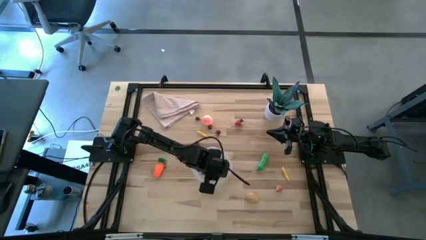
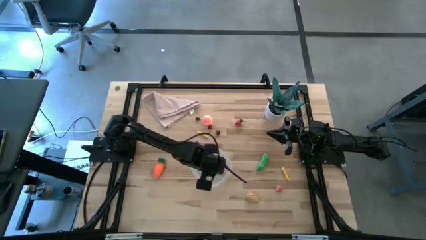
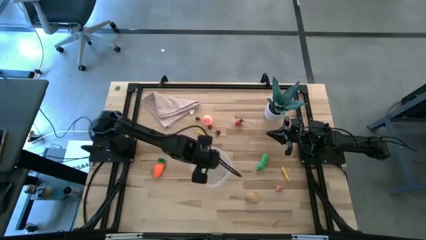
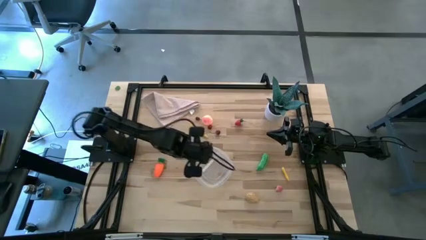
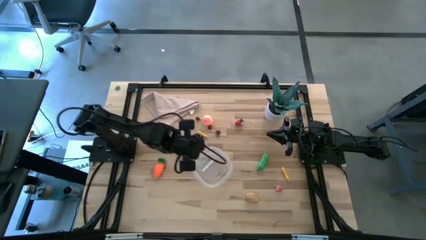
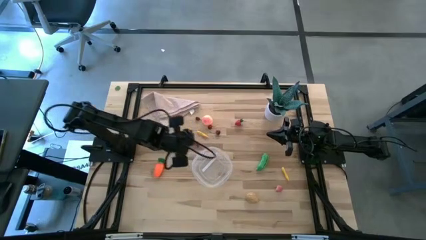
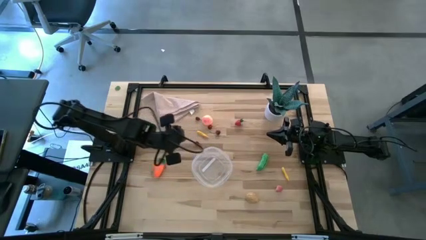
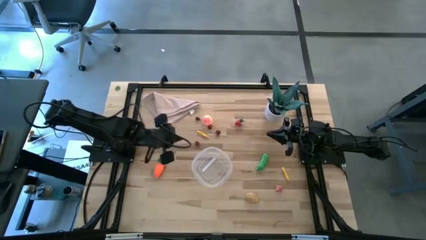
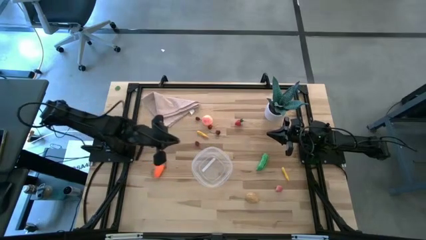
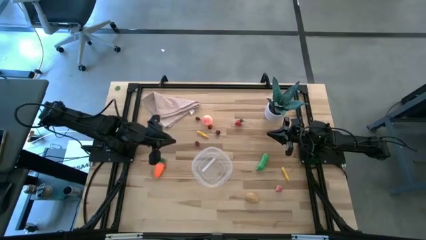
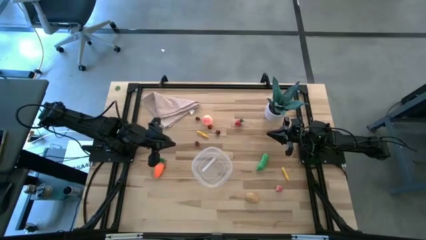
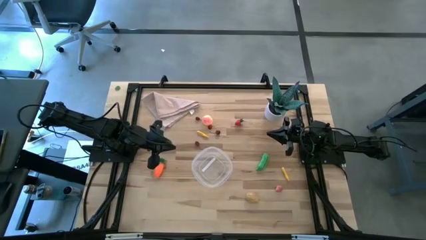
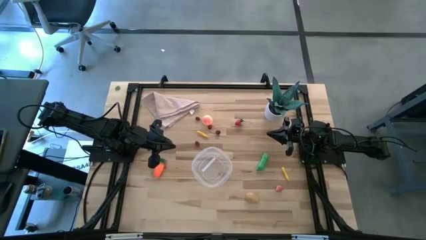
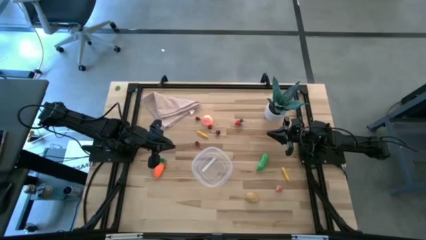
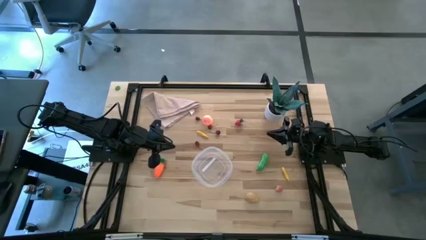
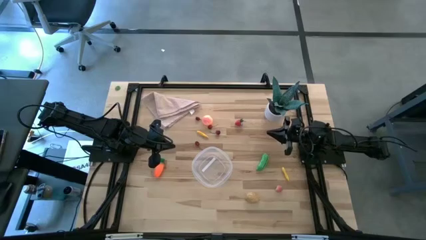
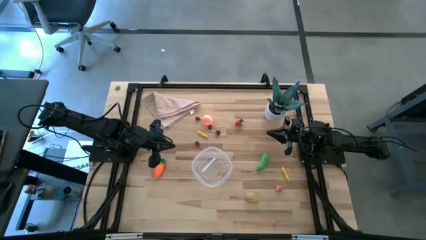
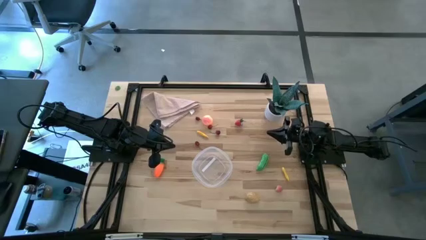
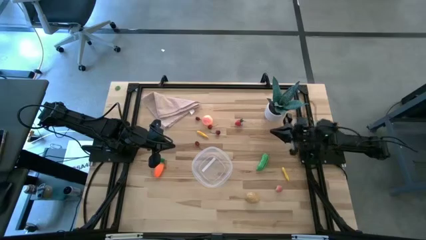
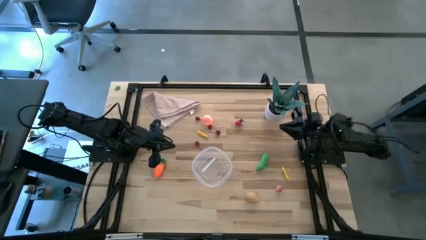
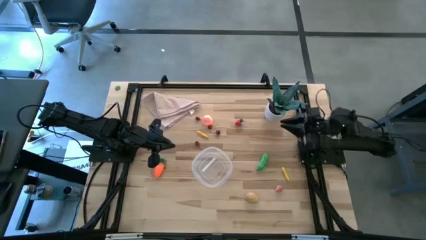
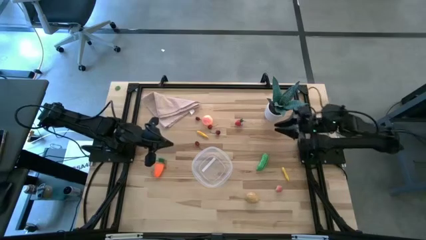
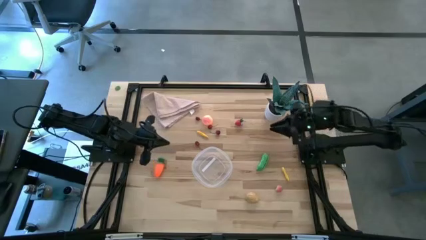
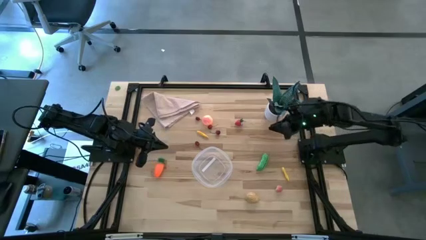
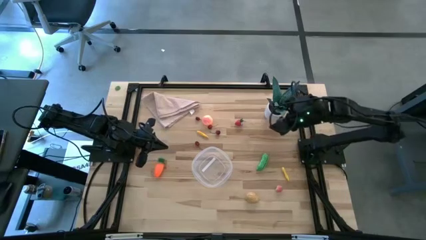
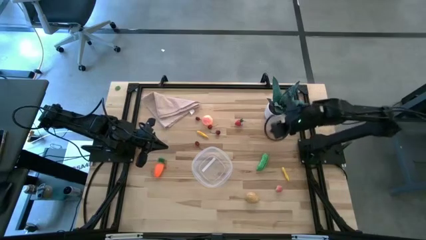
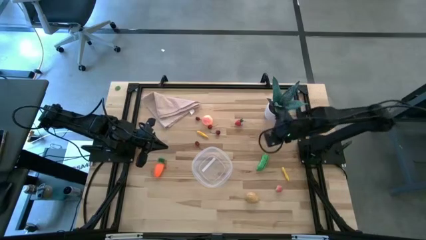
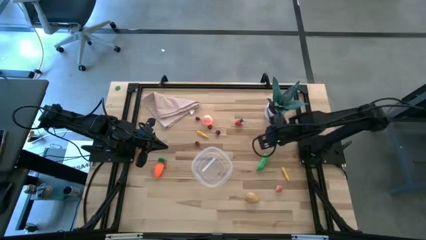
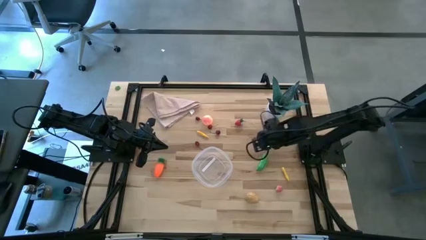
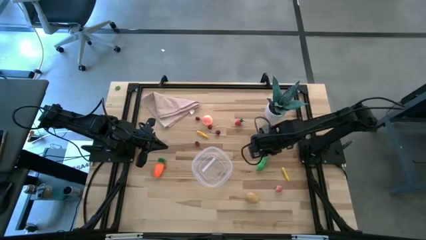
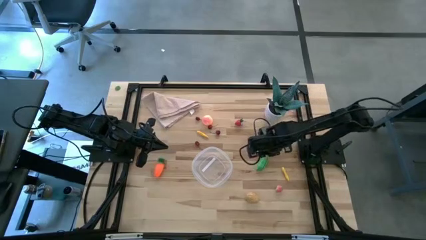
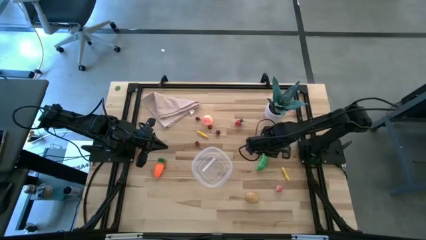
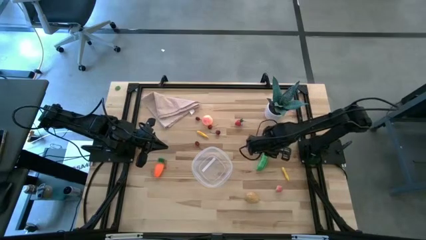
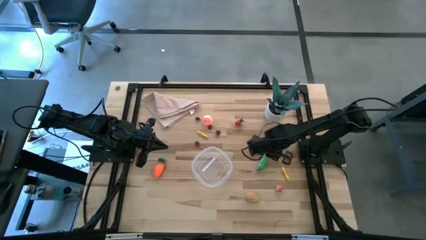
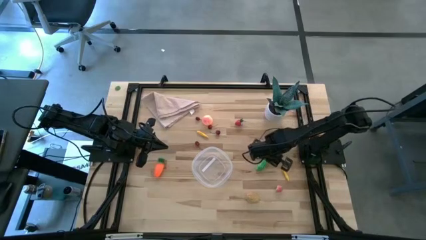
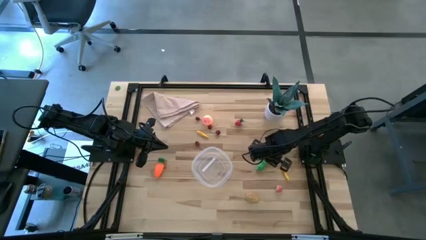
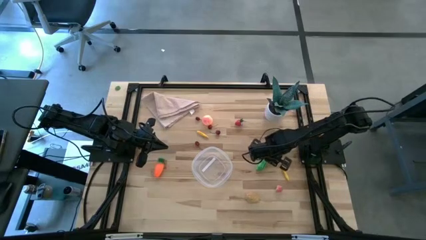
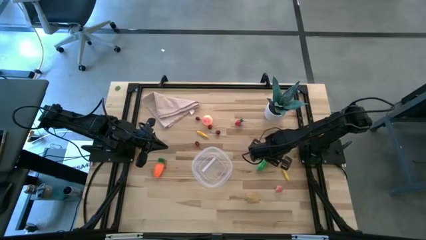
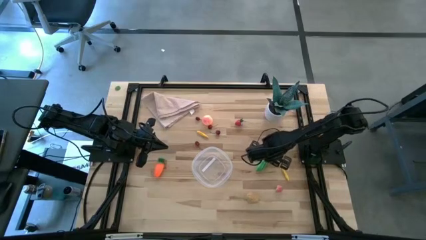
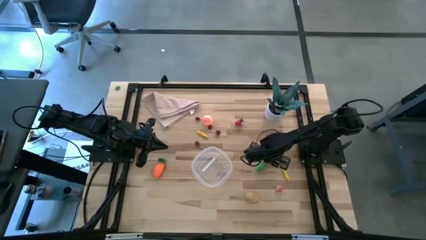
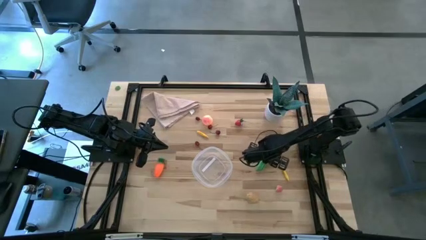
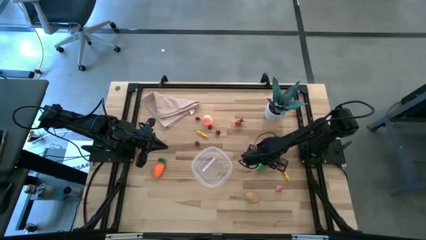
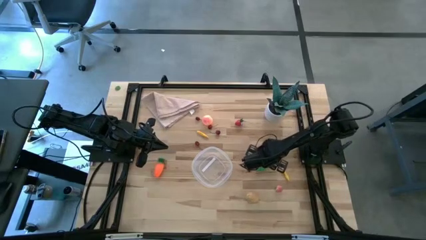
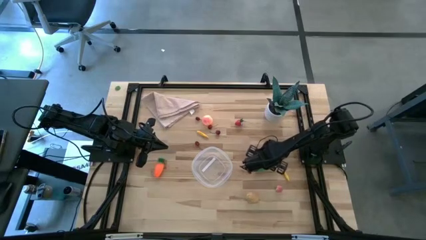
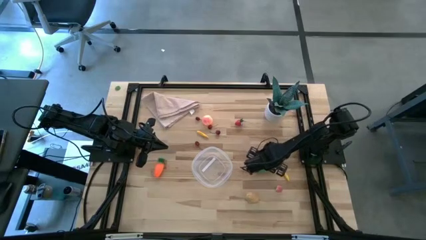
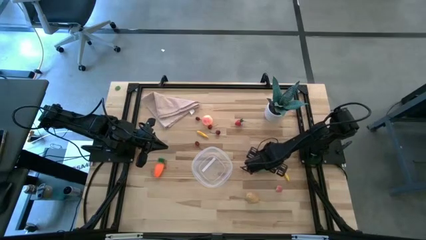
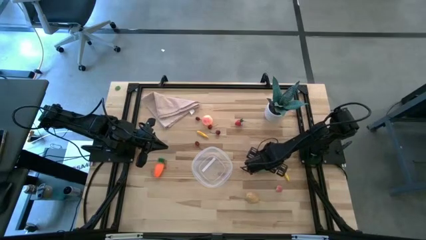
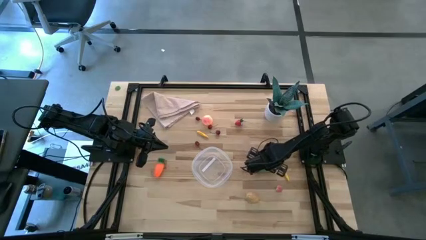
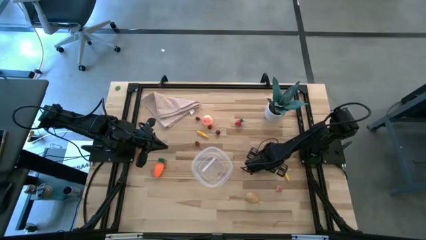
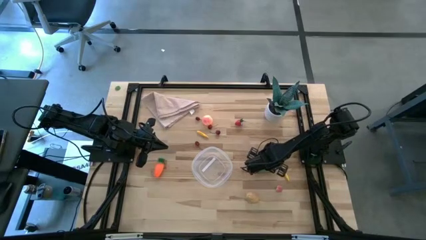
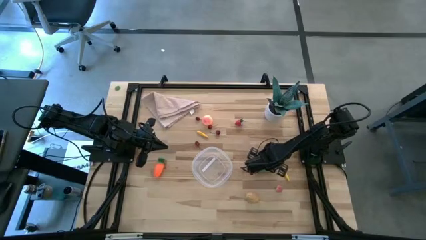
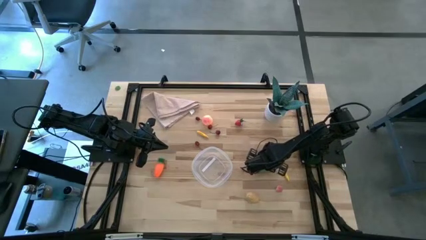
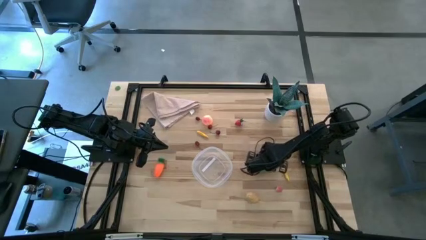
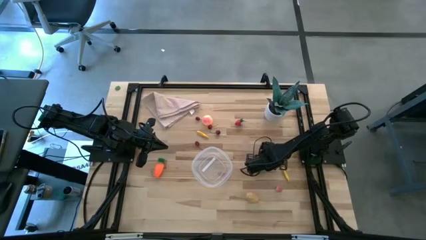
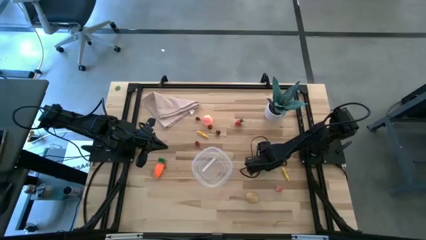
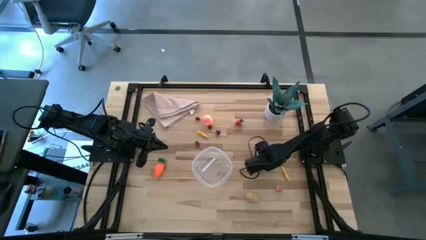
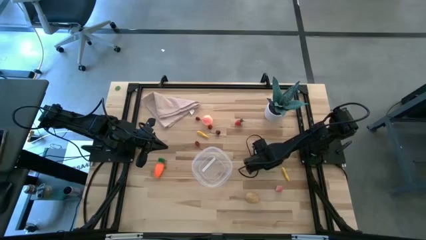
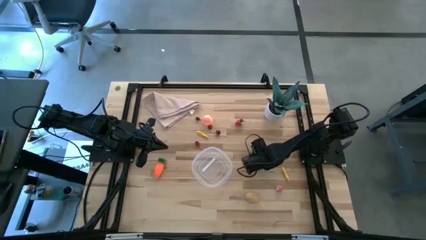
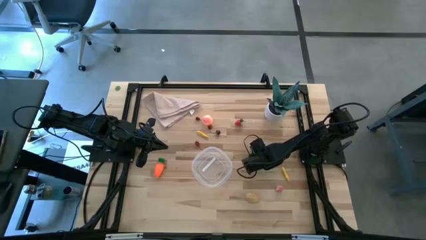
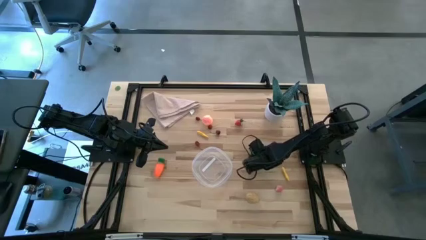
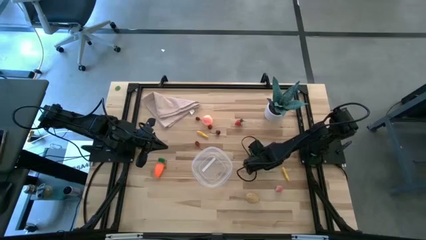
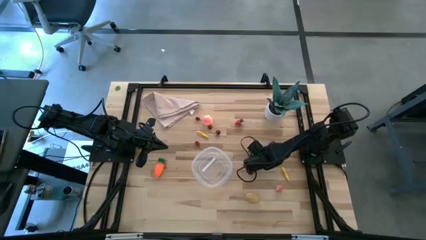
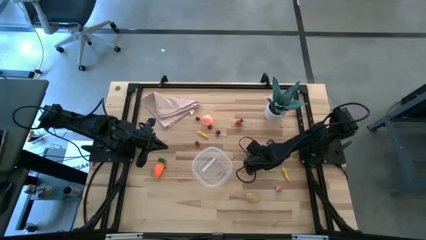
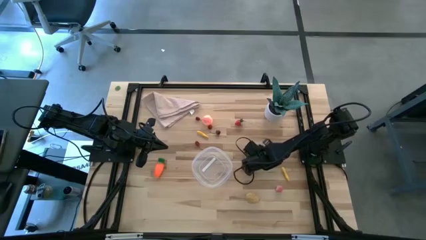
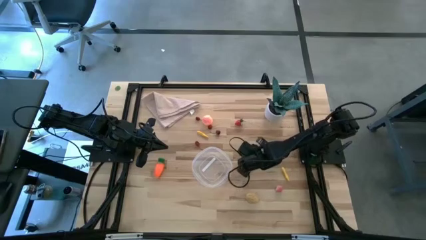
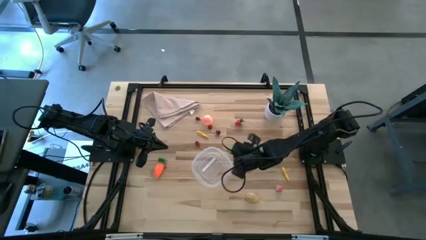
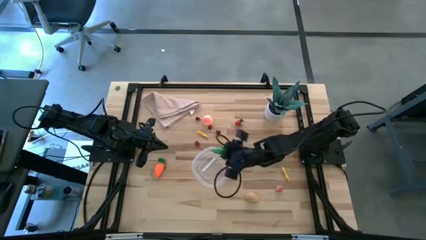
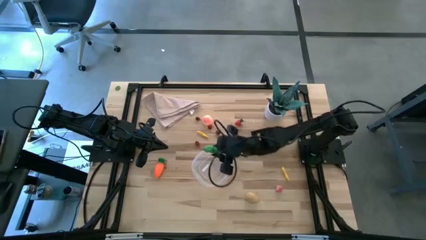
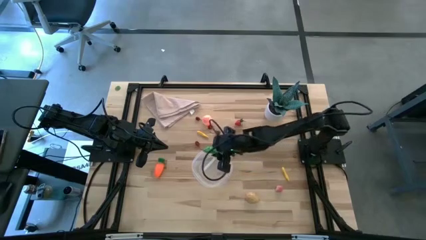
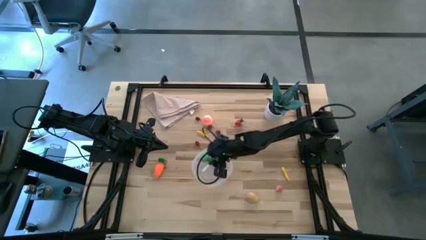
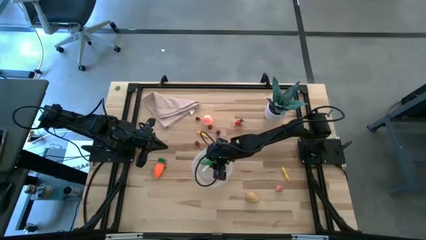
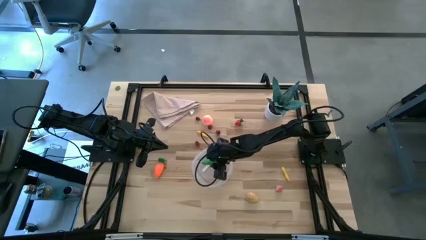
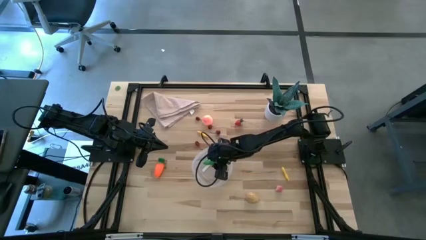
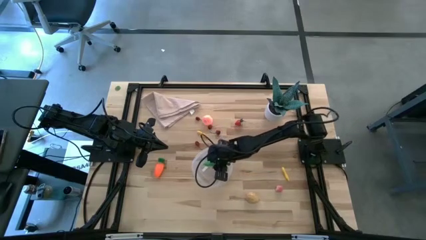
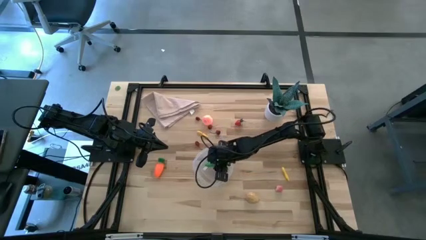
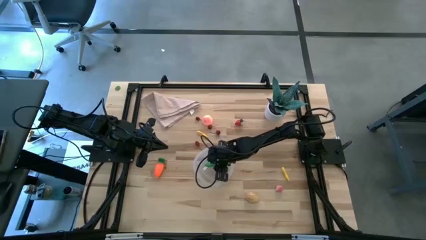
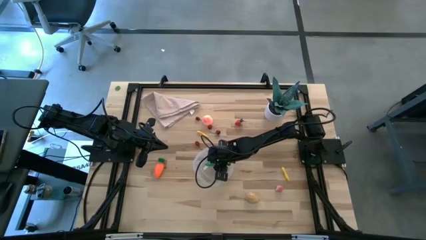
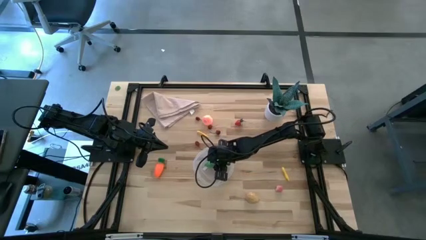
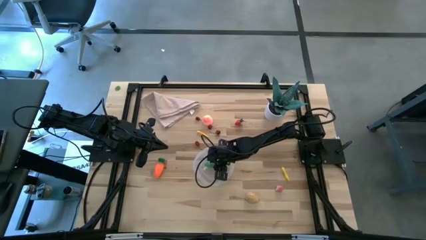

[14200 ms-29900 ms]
Task: Pick and placing Produce into tupperware
Put the green peas into the transparent bin
